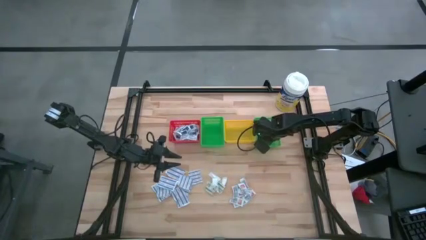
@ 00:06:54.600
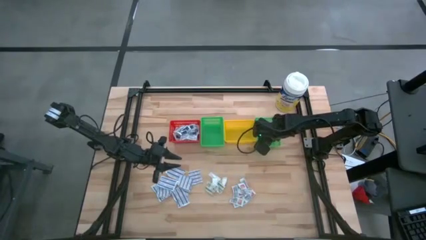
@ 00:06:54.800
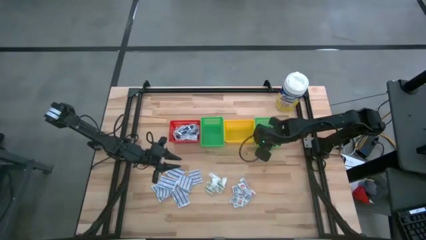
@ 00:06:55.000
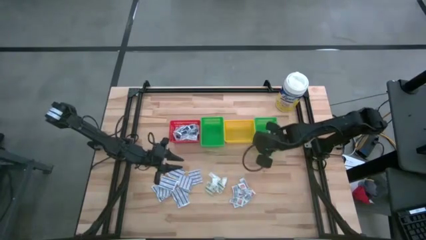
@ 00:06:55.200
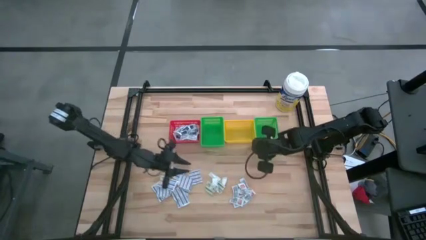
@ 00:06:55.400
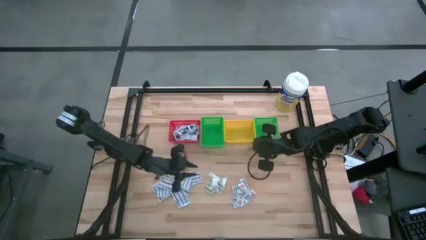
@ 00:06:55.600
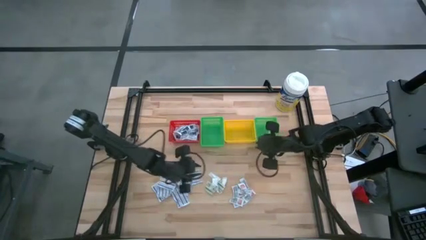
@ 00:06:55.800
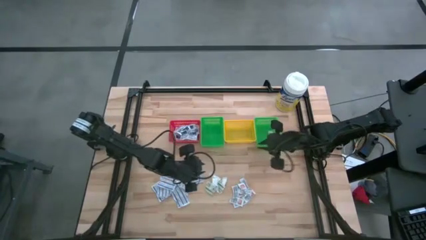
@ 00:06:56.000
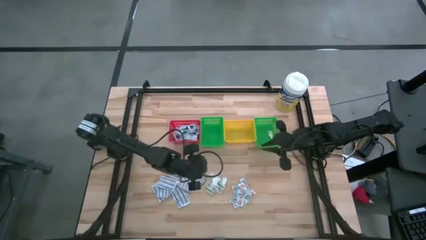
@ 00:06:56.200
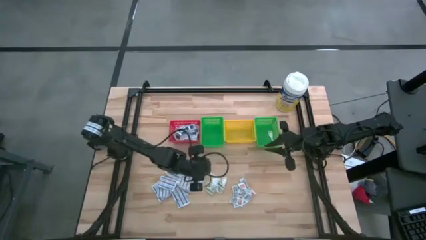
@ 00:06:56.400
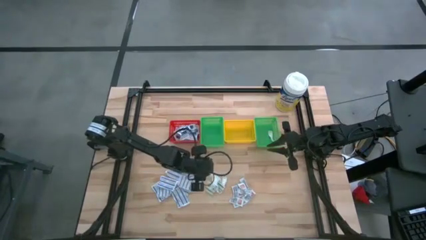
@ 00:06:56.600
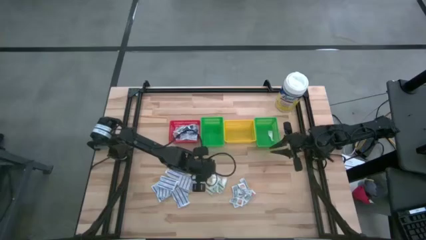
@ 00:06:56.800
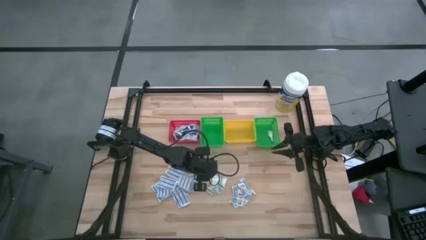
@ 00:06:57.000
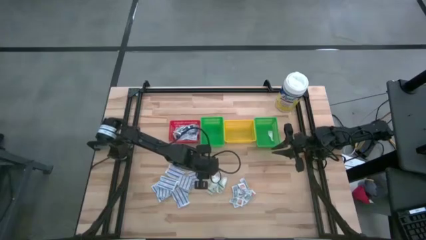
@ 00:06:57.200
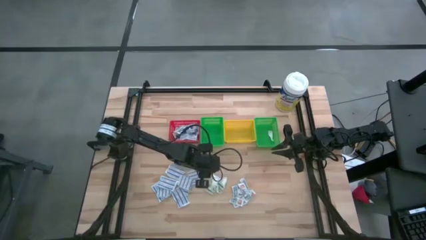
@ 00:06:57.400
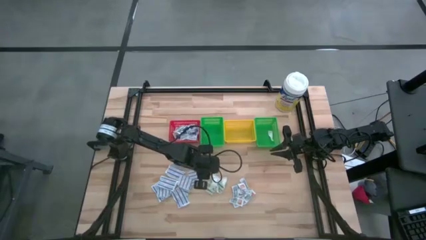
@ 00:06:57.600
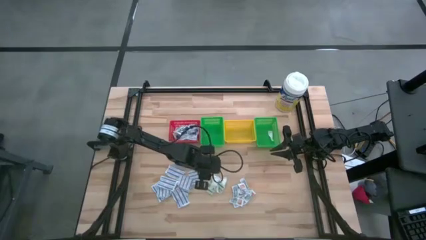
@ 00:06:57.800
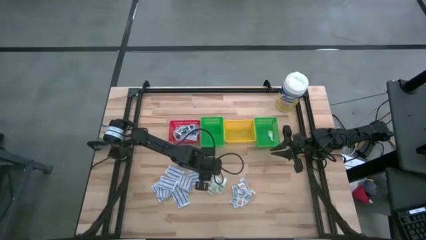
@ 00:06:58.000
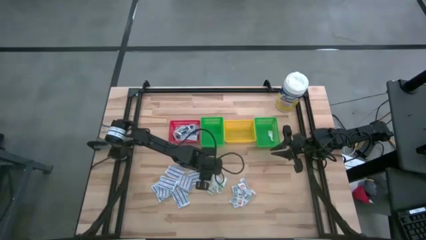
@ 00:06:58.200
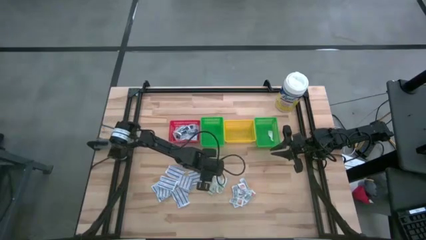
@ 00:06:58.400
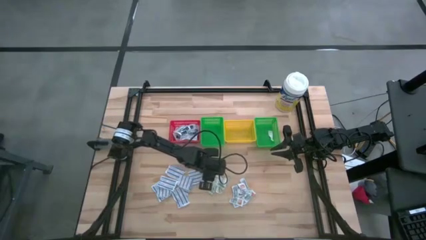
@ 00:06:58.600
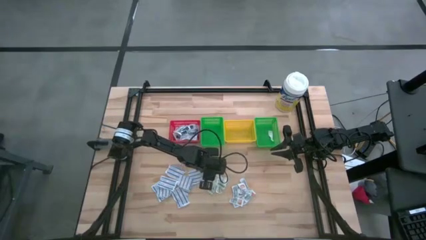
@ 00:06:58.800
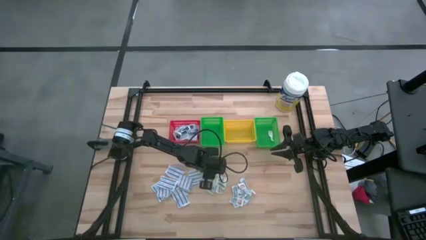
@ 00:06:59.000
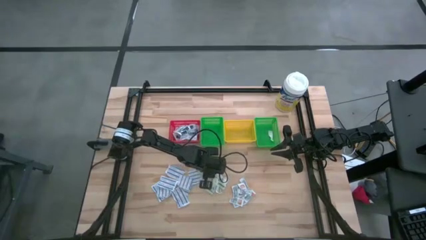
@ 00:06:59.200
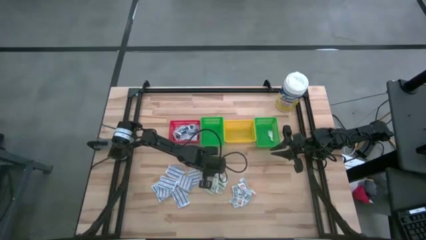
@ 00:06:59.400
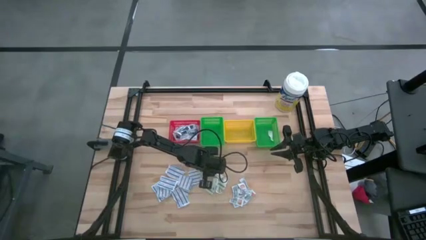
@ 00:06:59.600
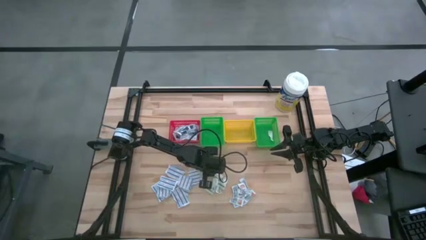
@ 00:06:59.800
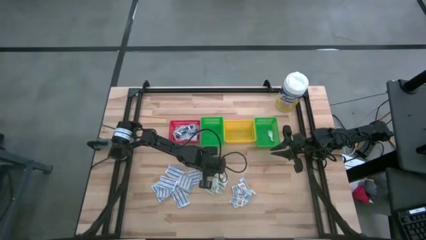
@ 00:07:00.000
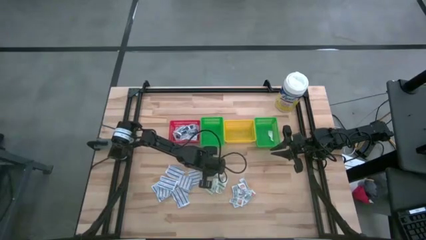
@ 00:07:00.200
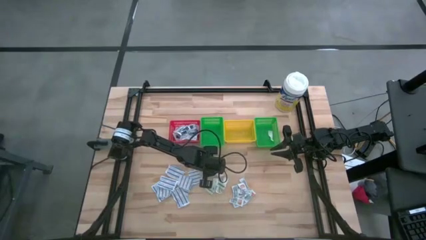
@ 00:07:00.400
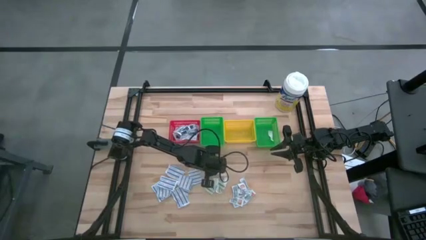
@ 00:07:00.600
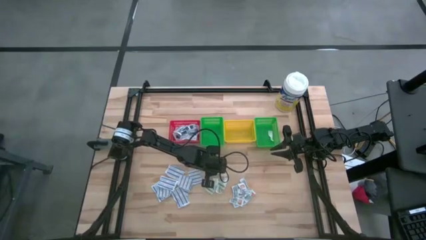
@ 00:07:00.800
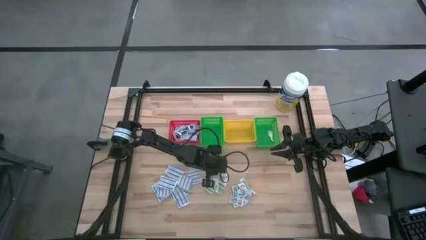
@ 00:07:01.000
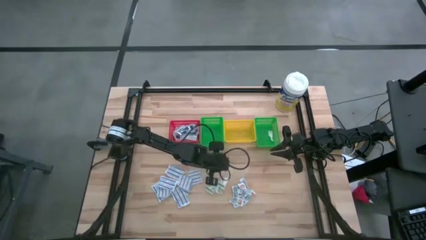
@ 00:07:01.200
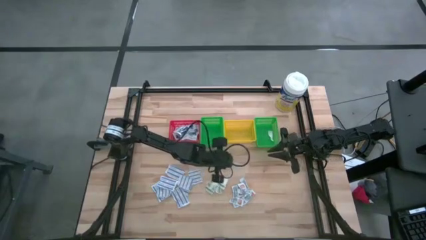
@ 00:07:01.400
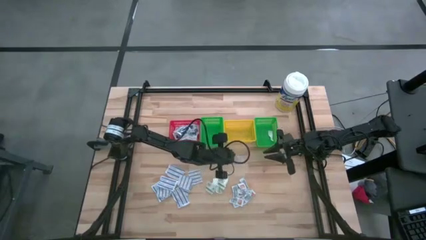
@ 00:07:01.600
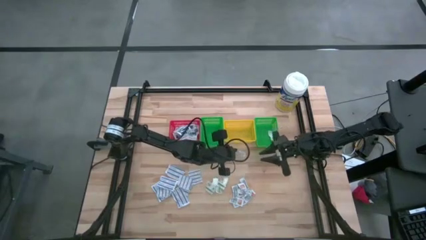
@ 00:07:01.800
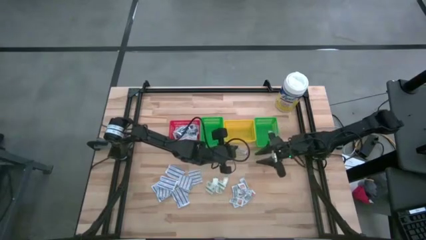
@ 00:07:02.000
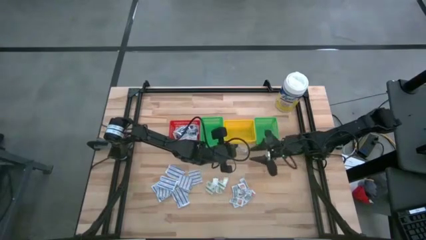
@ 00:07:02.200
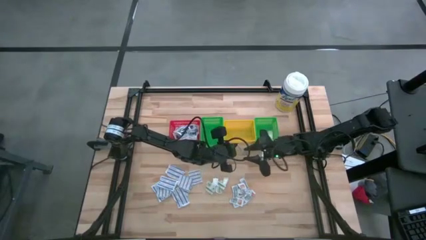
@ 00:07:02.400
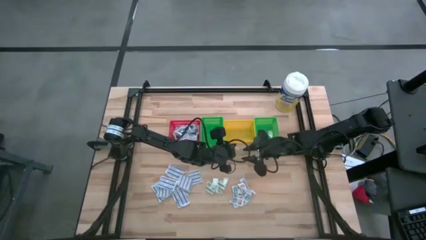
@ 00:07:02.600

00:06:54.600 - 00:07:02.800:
Task: Pick & Place First Aid Supplies
Put the green bandage into the right green basket

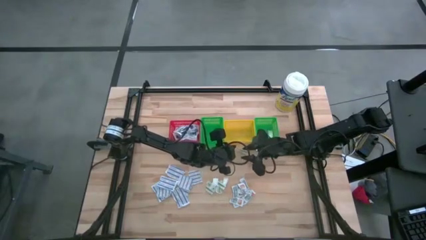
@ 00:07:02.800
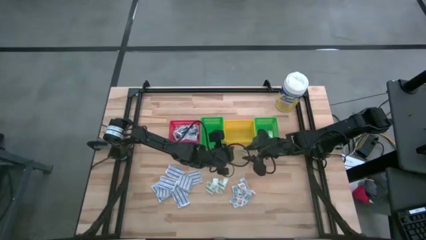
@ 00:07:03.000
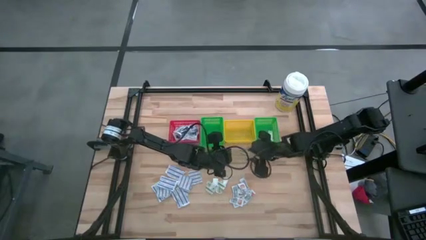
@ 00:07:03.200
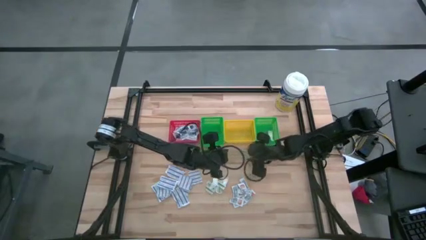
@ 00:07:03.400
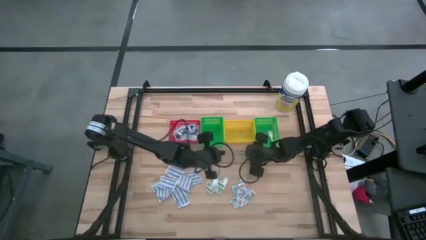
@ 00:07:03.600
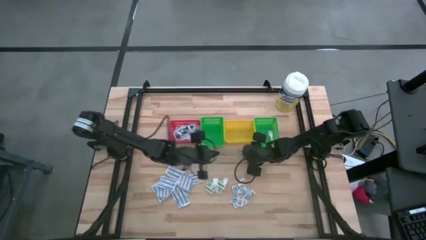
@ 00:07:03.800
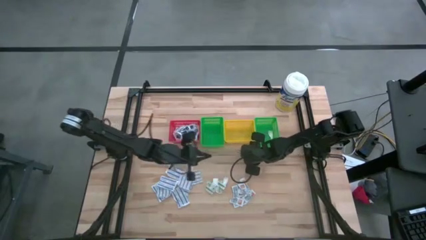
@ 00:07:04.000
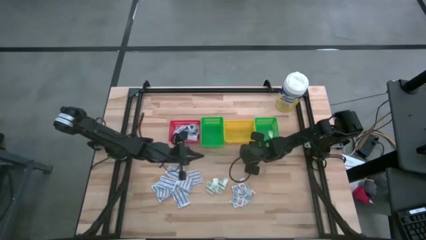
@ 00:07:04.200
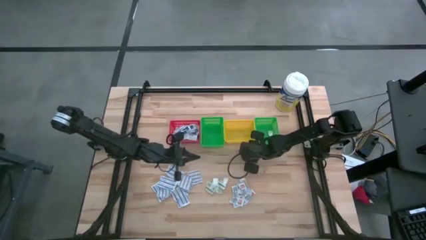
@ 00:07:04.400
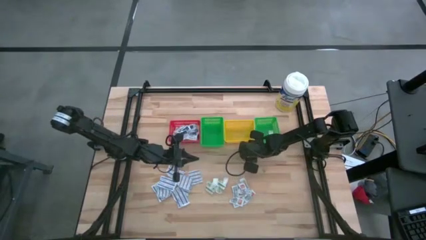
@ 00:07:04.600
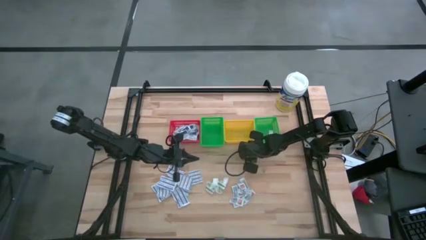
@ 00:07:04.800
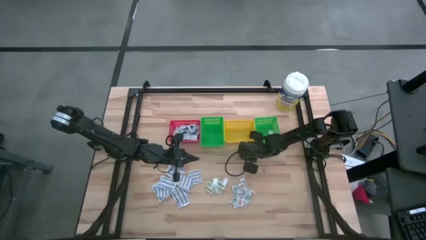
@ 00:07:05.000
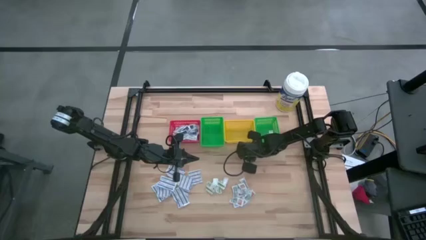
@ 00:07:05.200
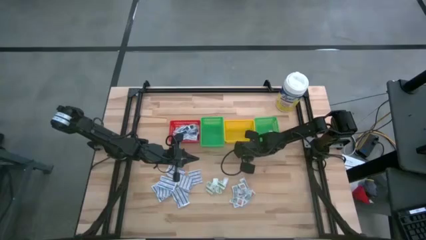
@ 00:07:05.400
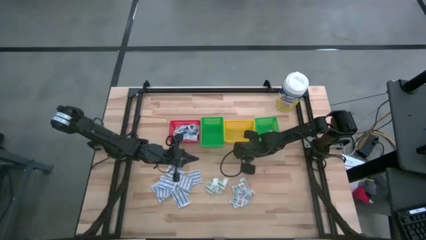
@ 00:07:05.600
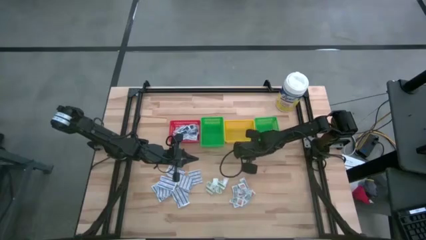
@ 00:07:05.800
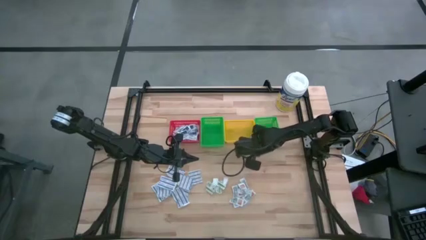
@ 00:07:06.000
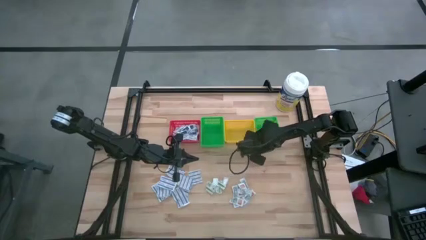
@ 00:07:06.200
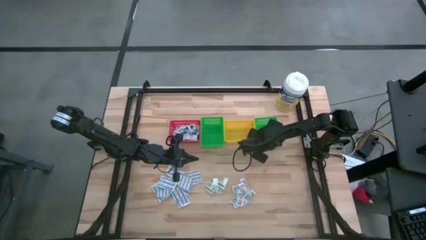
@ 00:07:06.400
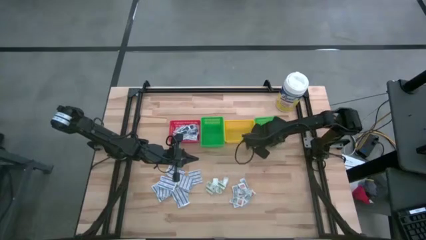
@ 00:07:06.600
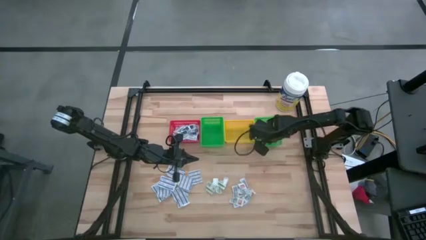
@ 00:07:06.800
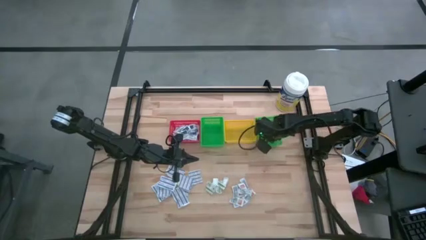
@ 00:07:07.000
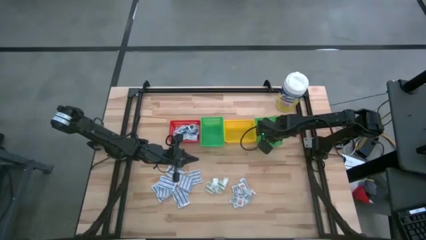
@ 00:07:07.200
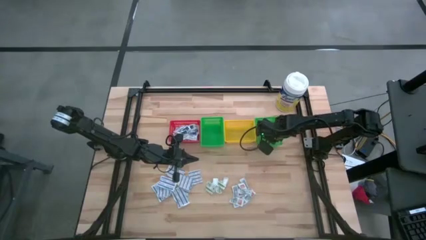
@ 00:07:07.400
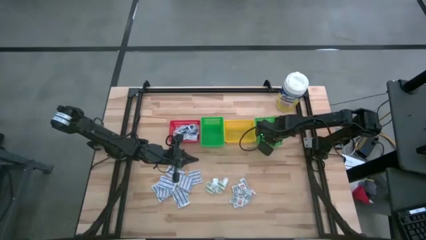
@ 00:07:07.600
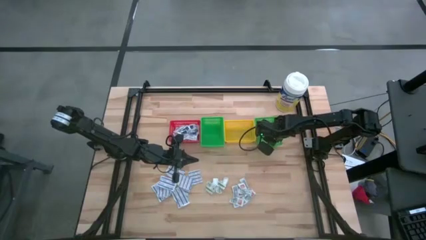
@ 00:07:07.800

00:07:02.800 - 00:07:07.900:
Put the green bandage into the right green basket
